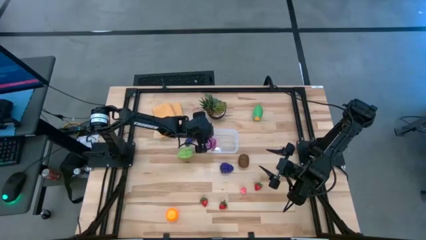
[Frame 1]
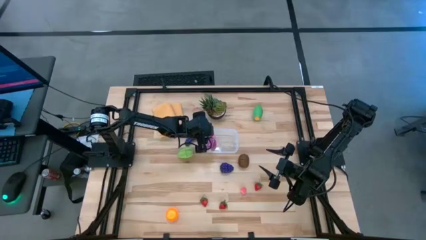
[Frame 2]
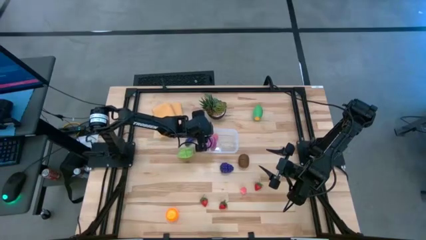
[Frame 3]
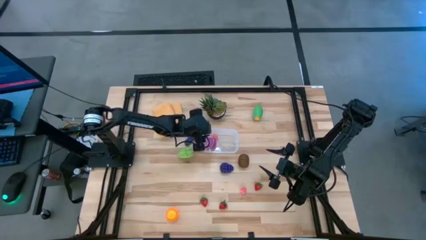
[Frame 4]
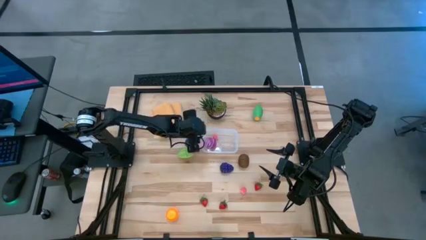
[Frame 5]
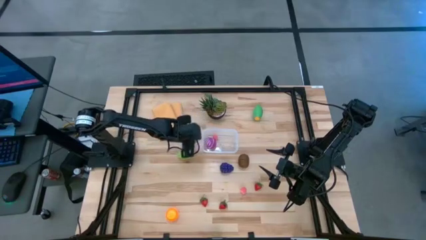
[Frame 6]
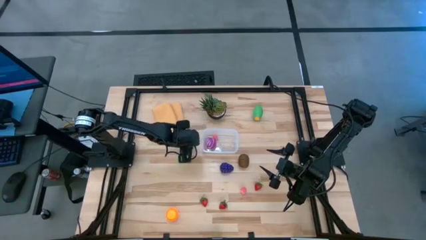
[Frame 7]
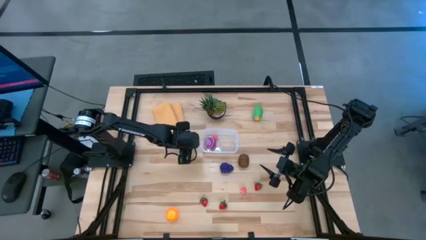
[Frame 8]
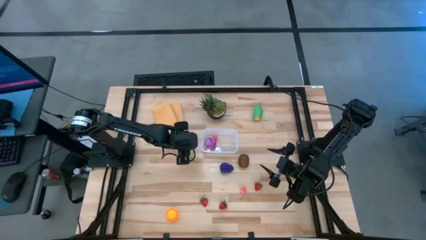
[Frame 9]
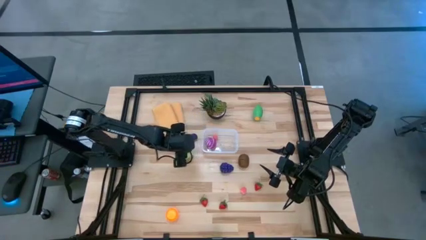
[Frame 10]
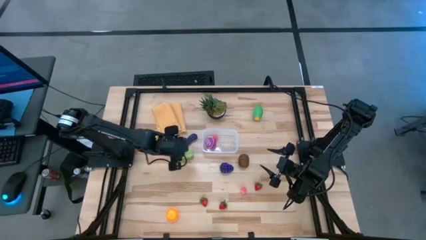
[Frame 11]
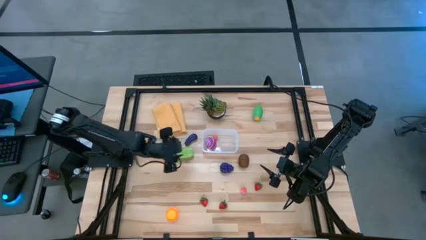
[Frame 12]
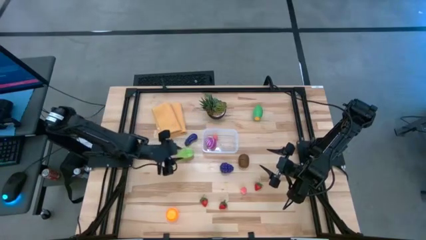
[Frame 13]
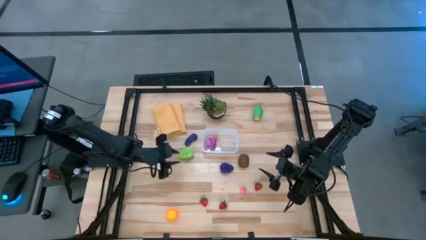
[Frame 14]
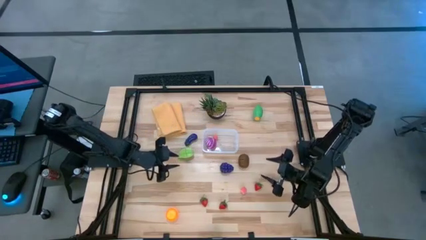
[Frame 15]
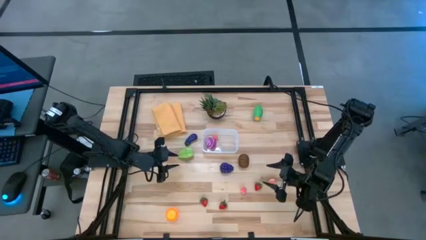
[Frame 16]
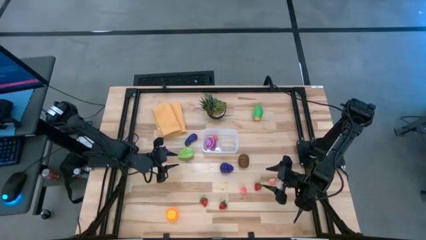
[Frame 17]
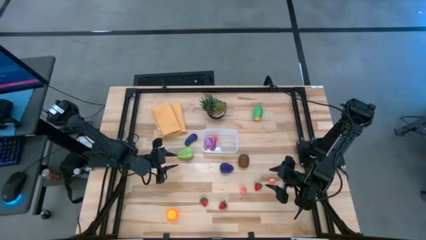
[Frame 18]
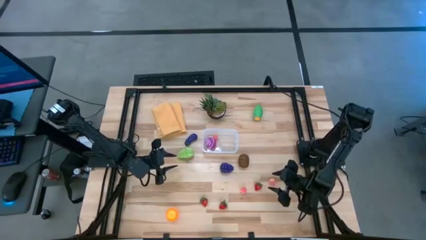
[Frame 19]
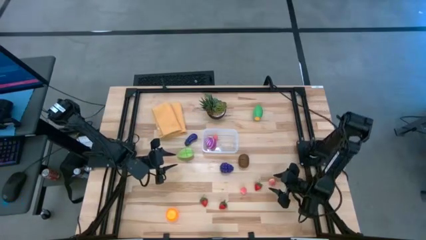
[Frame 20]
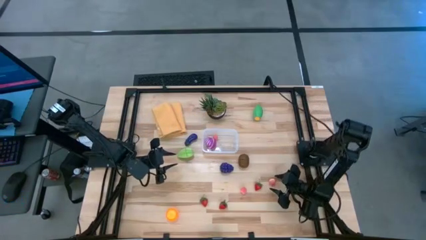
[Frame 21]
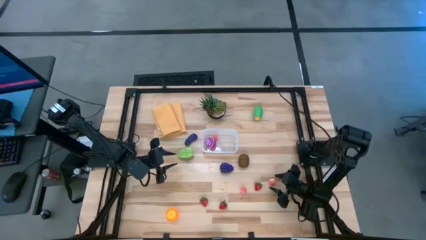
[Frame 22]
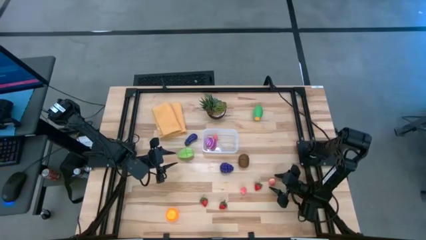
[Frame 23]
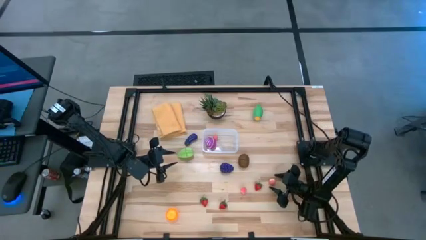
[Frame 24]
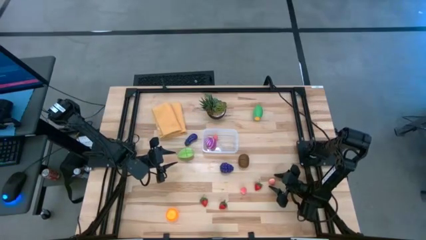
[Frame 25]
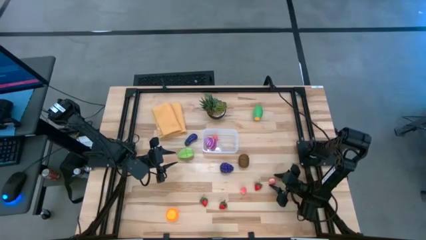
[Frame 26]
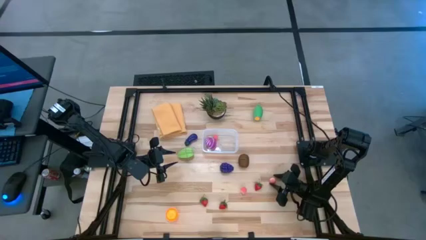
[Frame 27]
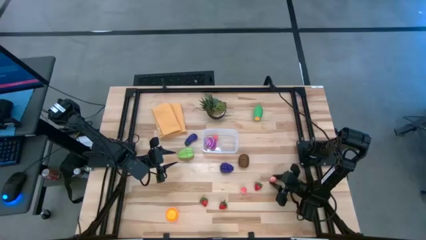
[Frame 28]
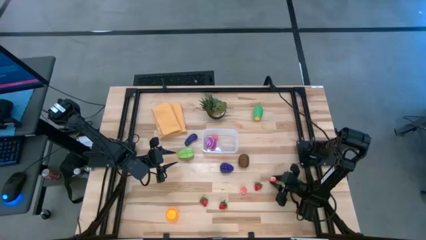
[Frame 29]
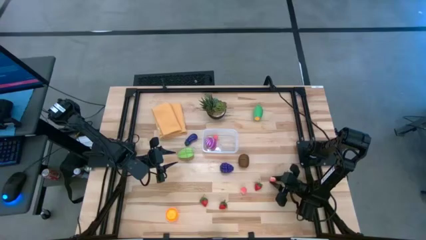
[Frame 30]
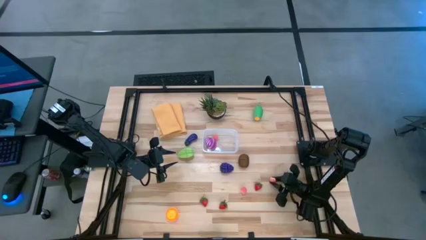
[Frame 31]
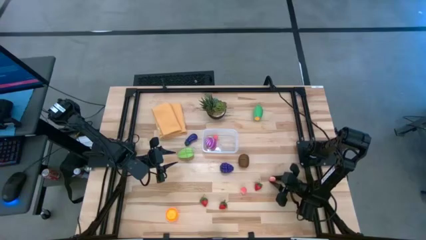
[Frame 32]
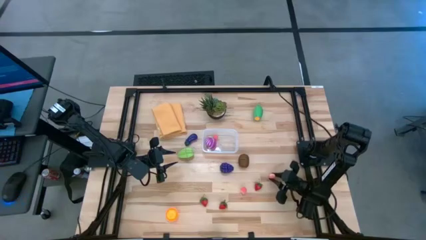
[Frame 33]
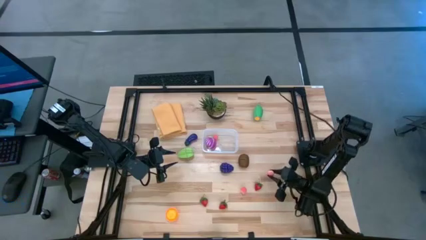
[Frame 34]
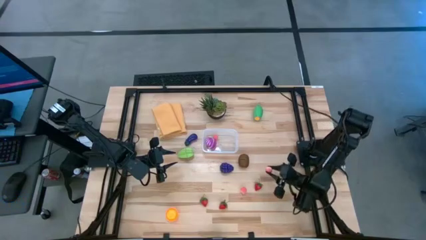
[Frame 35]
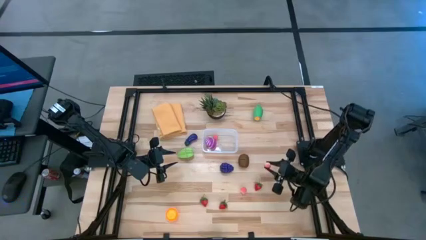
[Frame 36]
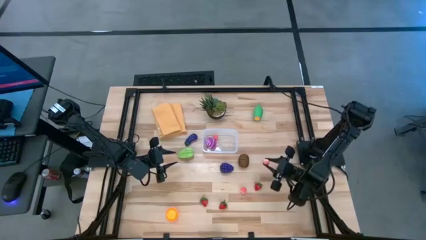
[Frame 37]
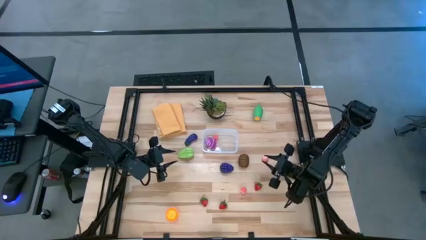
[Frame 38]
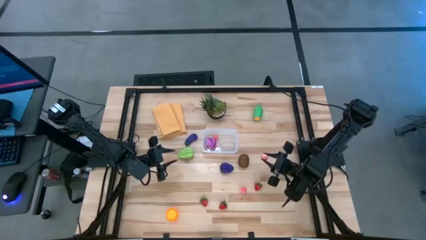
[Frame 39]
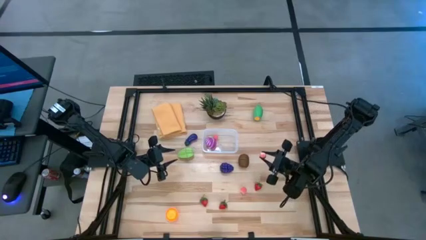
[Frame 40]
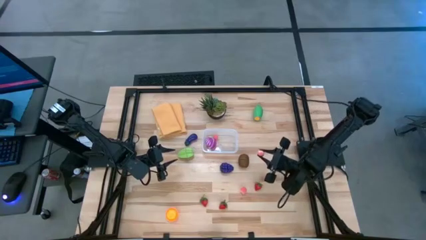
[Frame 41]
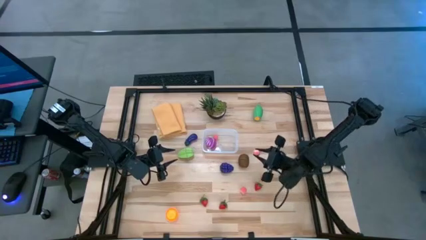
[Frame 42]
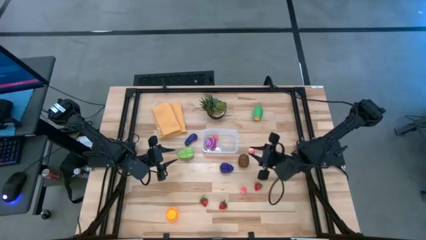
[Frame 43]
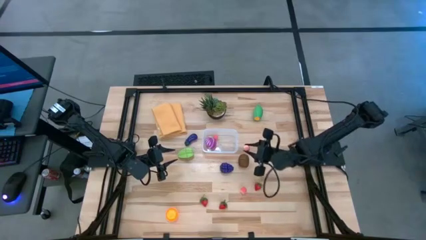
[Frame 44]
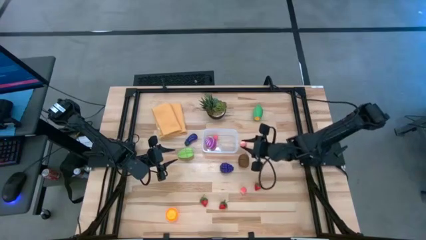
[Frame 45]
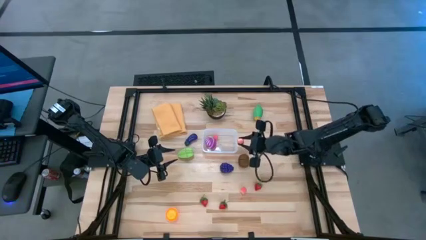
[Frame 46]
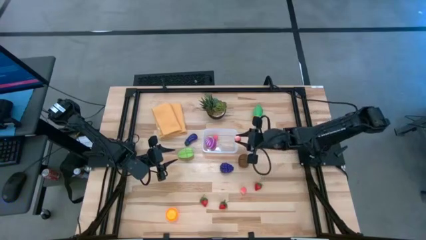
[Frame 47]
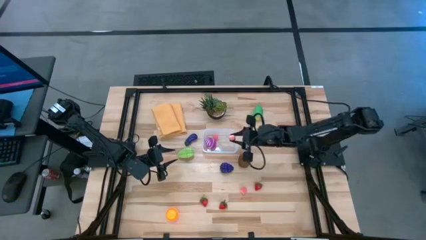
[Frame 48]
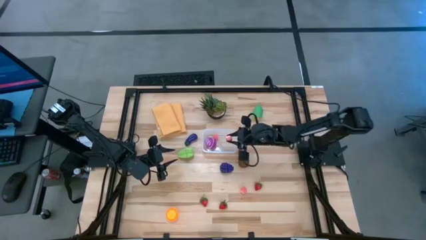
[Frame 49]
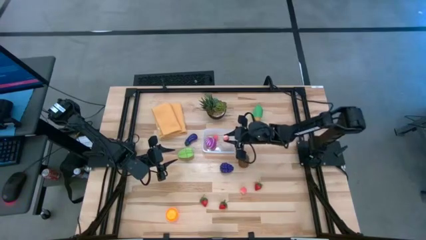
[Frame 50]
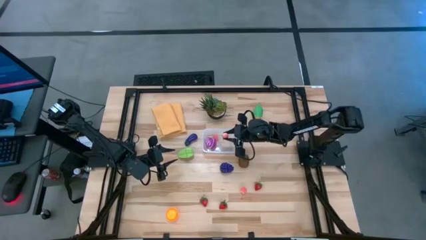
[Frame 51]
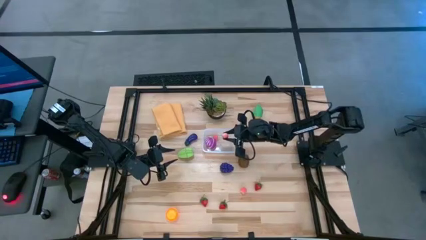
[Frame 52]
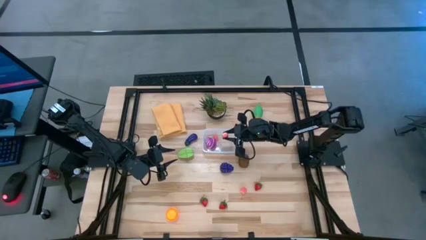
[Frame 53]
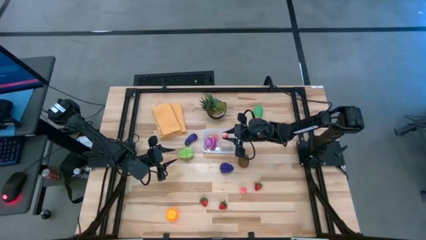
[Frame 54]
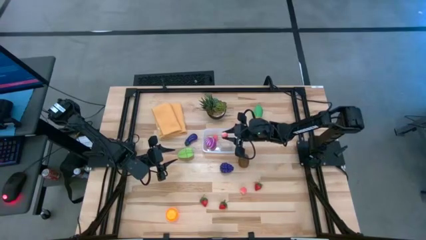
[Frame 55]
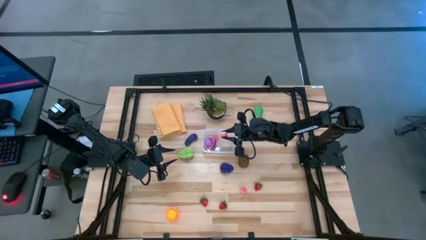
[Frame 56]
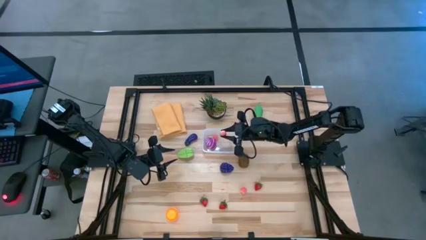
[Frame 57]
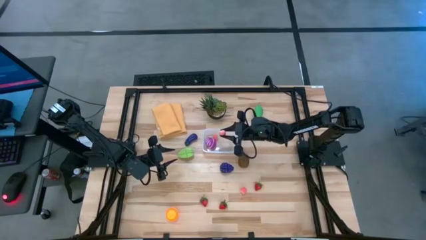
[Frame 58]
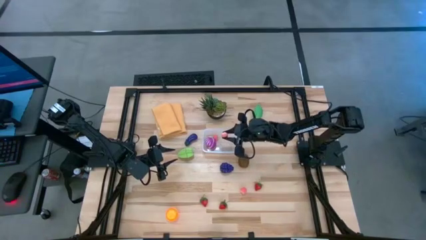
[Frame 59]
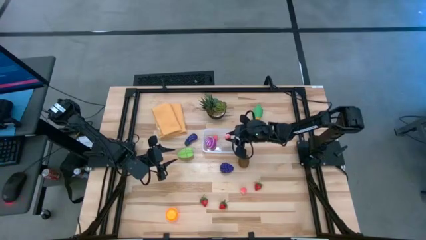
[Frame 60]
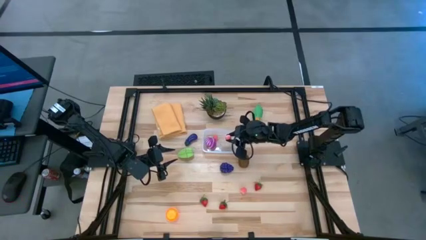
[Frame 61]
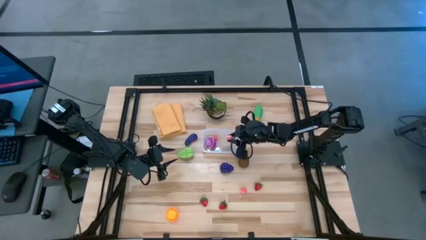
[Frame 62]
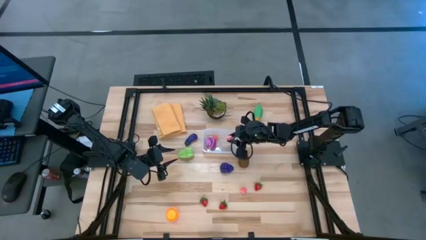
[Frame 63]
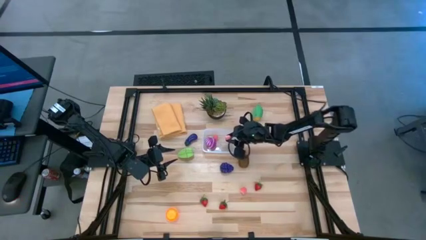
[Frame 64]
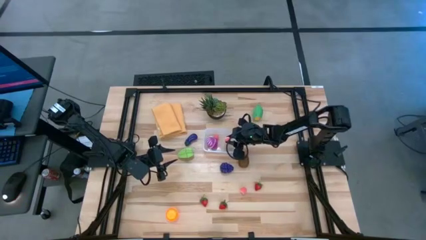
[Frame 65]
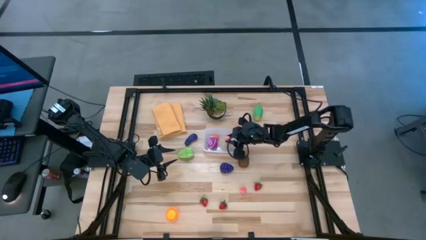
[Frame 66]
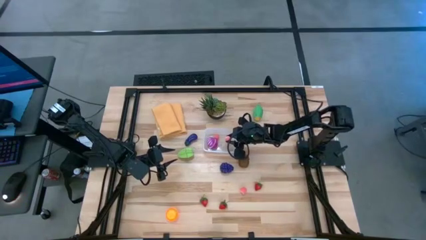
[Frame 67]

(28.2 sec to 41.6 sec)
Task: Pick and placing Produce into tupperware
Put the right pink peach into the transparent container
